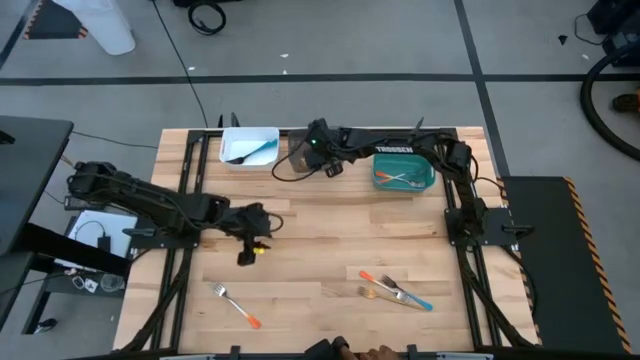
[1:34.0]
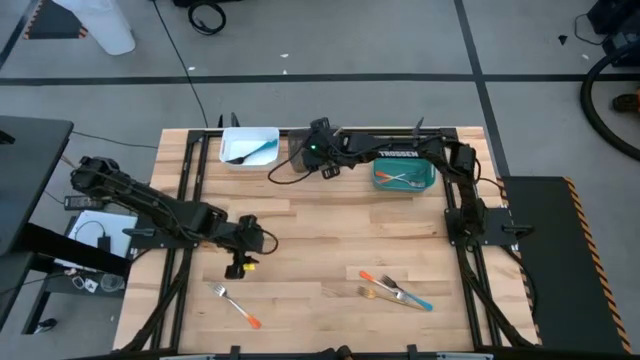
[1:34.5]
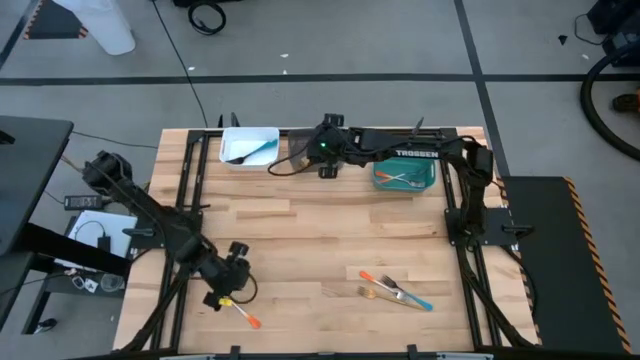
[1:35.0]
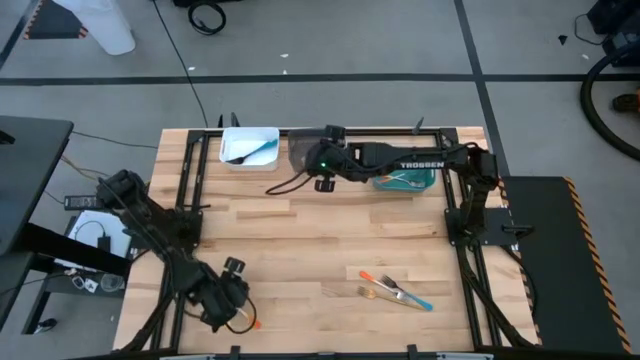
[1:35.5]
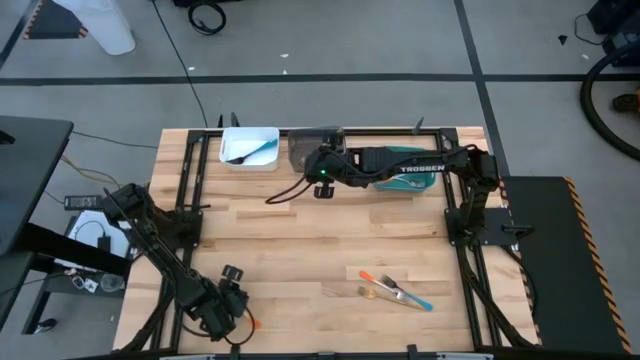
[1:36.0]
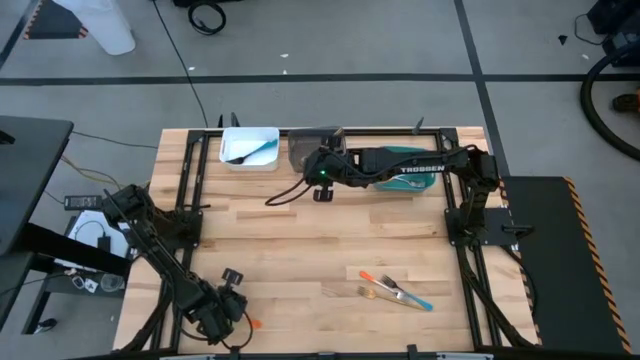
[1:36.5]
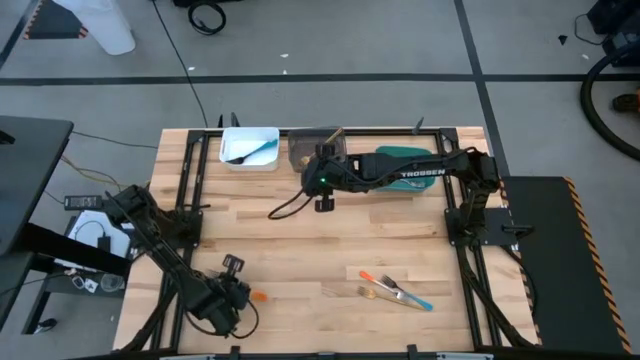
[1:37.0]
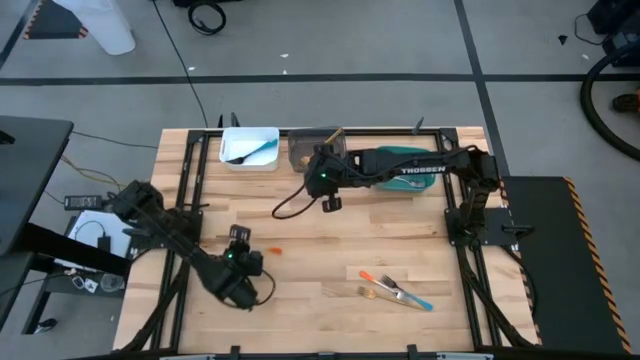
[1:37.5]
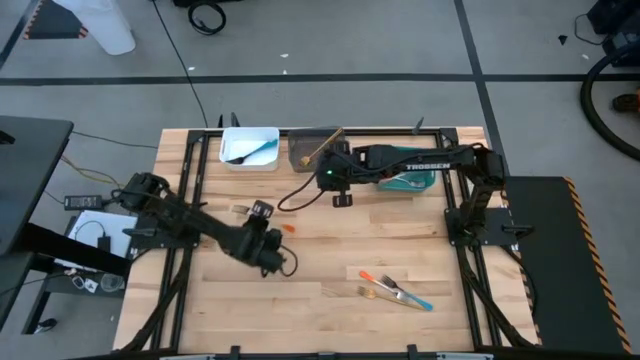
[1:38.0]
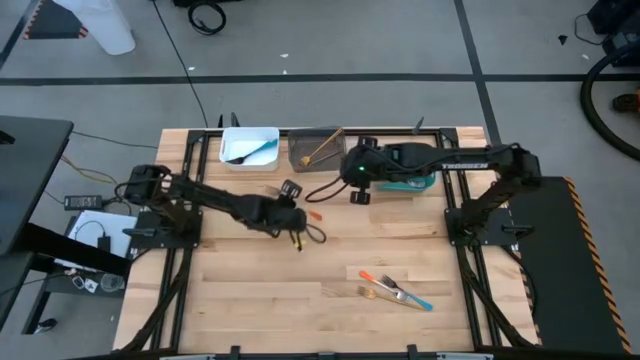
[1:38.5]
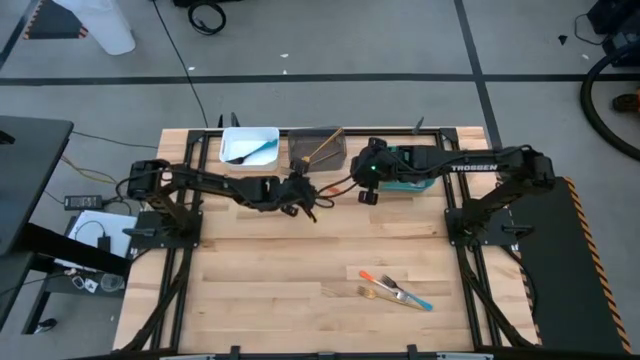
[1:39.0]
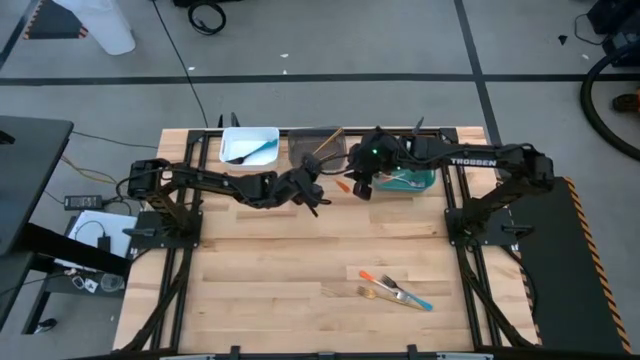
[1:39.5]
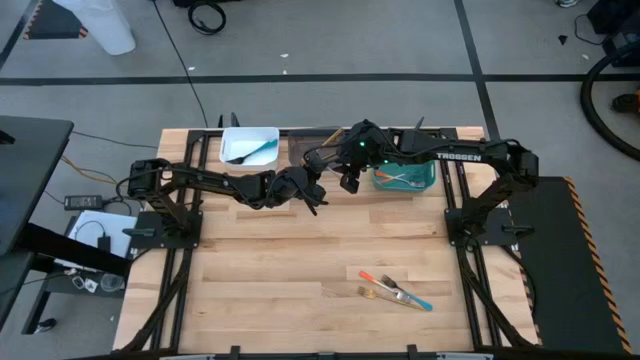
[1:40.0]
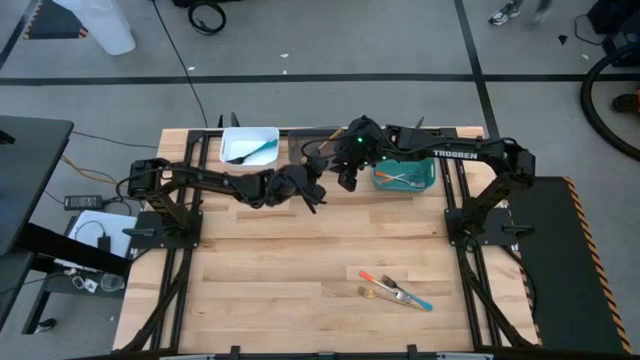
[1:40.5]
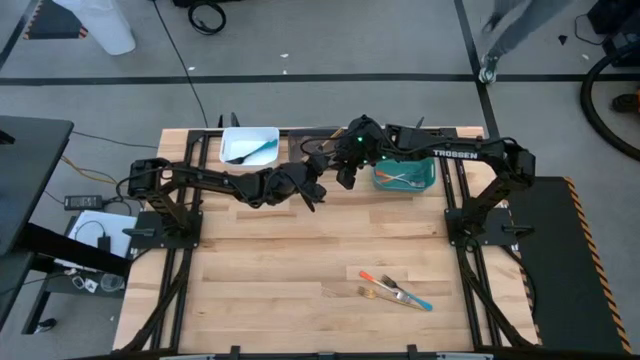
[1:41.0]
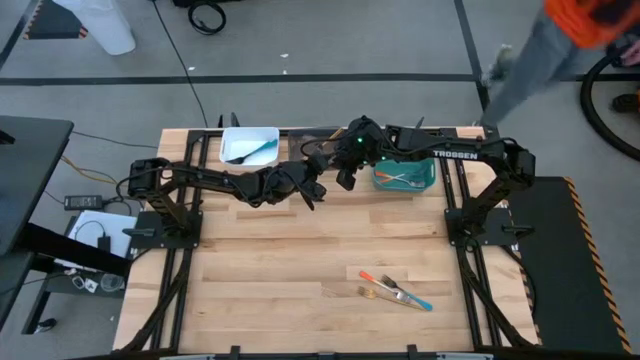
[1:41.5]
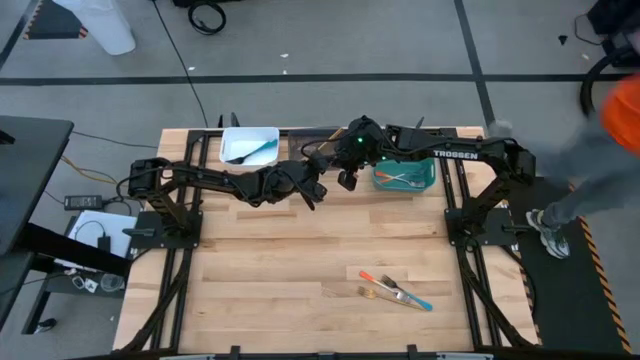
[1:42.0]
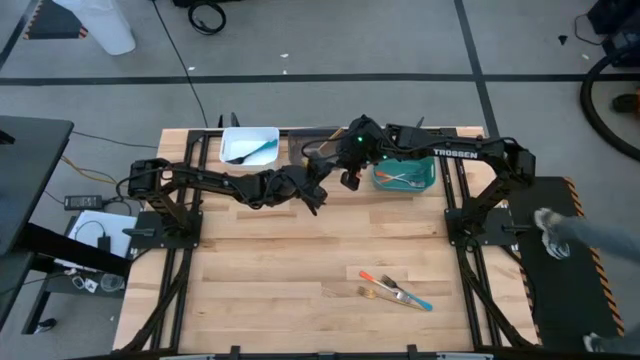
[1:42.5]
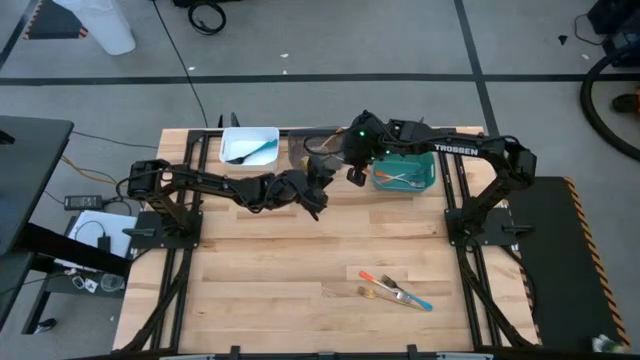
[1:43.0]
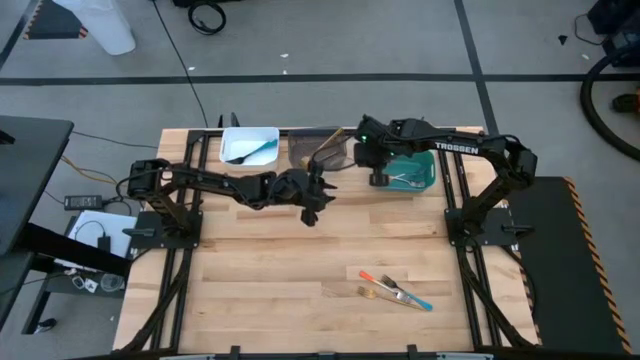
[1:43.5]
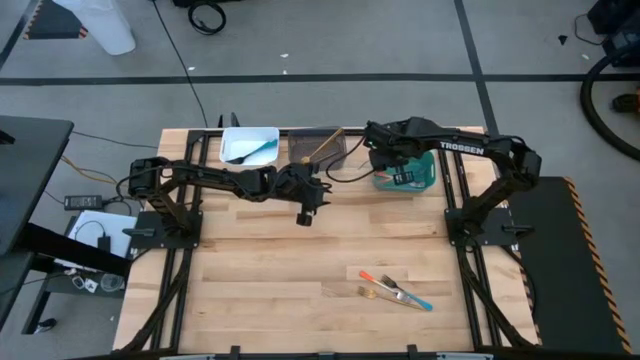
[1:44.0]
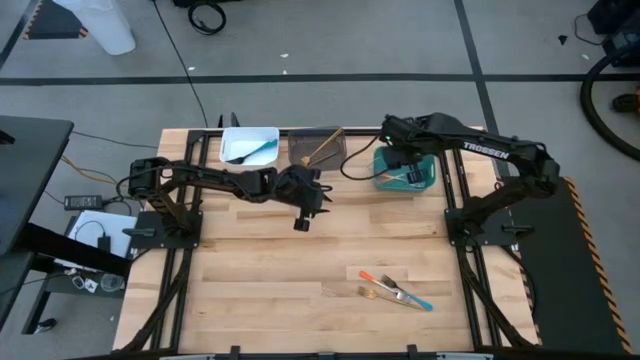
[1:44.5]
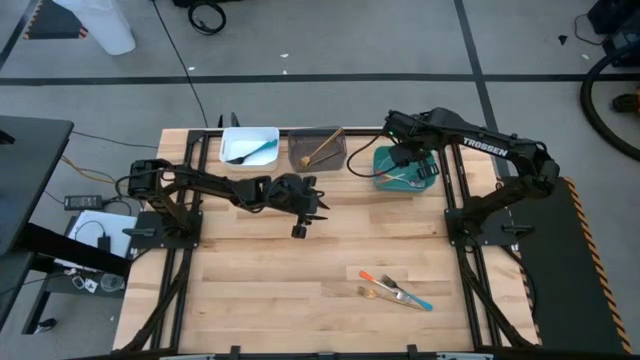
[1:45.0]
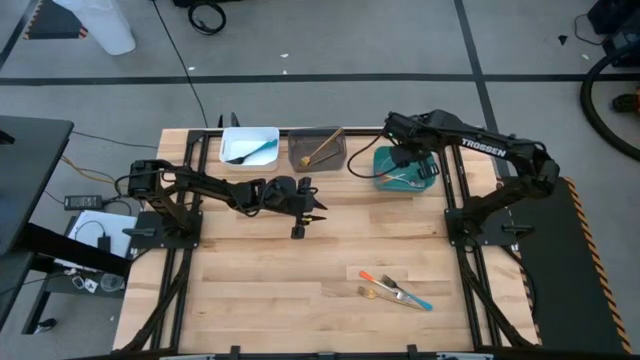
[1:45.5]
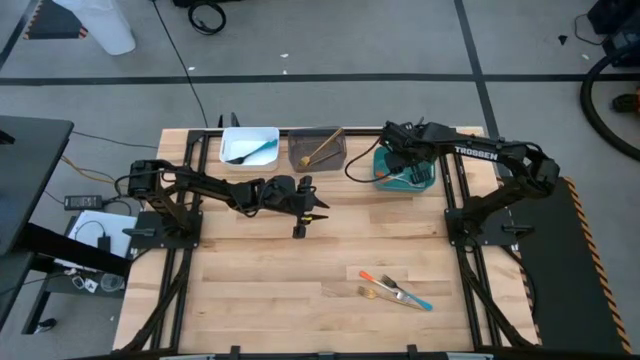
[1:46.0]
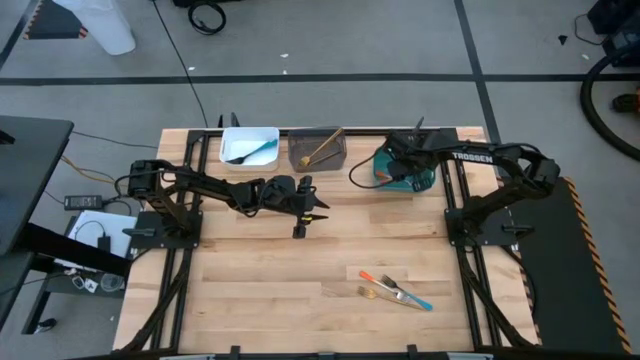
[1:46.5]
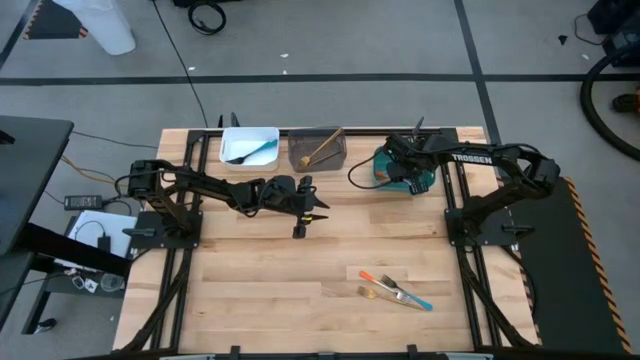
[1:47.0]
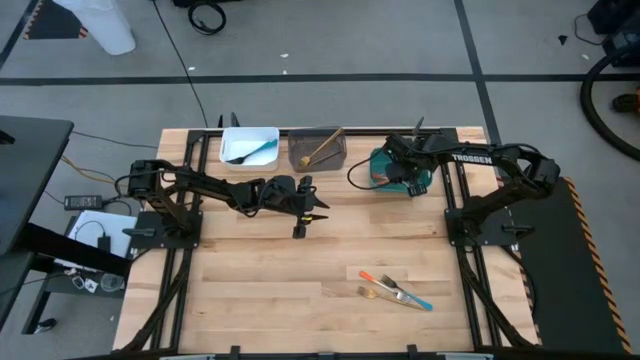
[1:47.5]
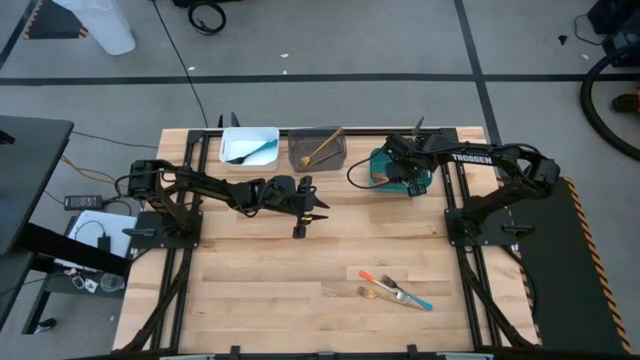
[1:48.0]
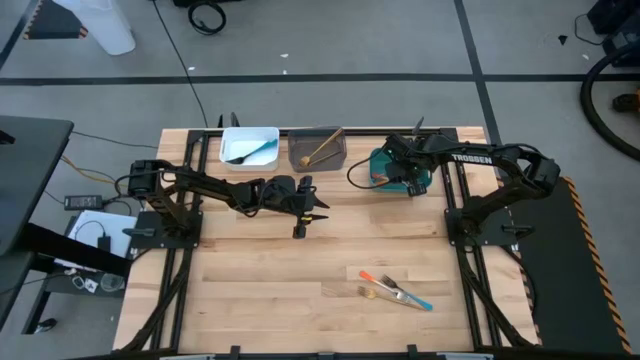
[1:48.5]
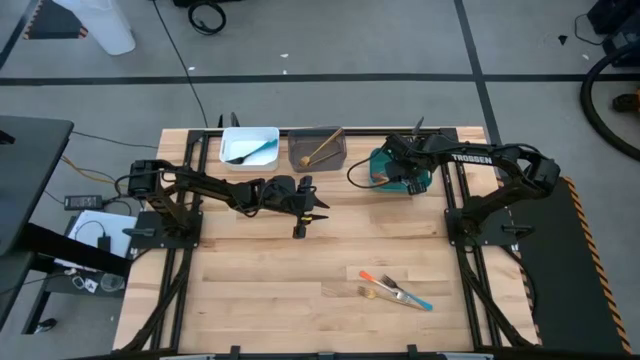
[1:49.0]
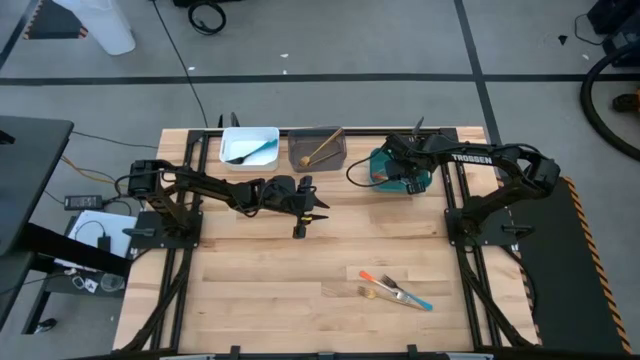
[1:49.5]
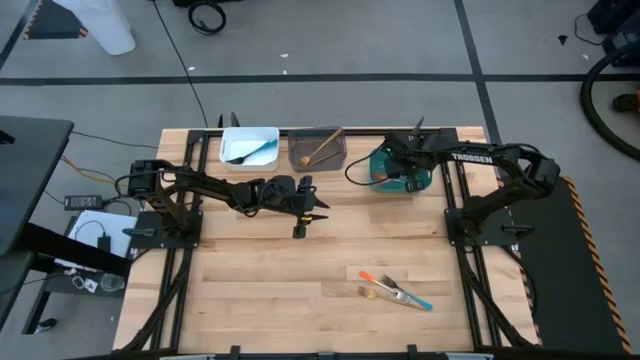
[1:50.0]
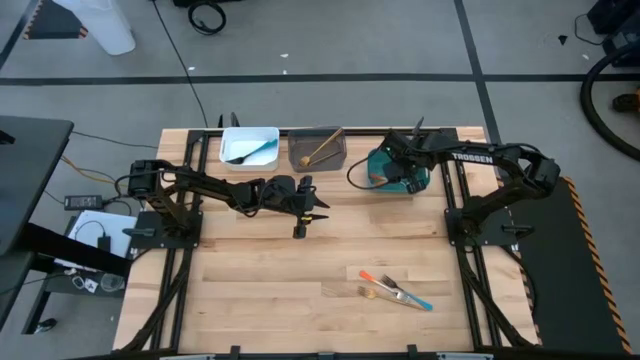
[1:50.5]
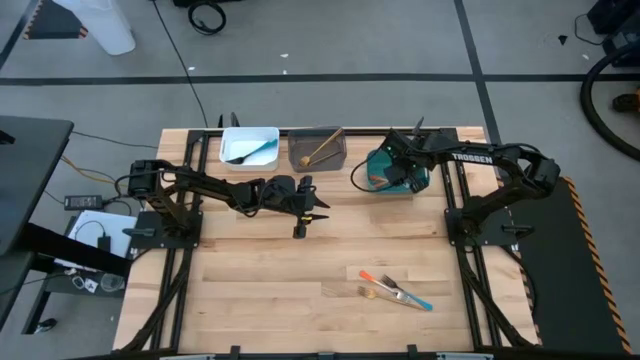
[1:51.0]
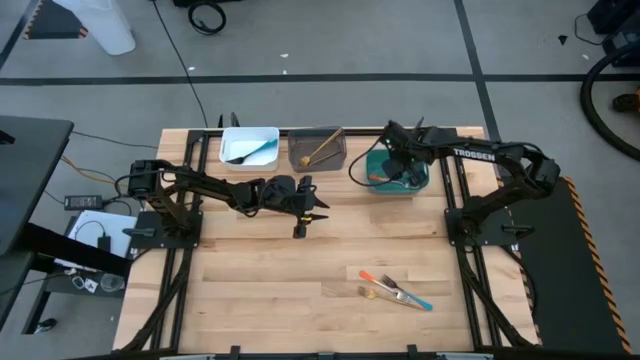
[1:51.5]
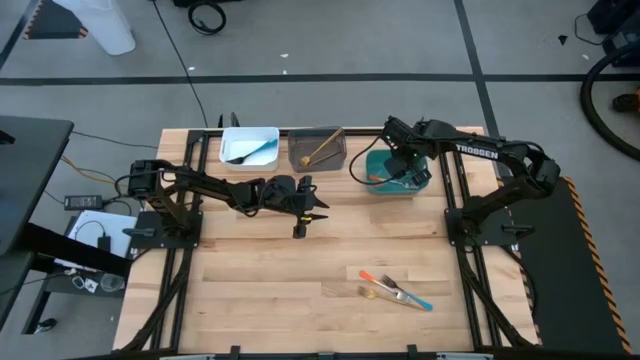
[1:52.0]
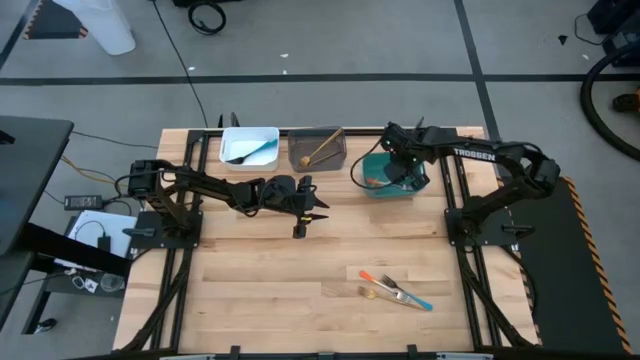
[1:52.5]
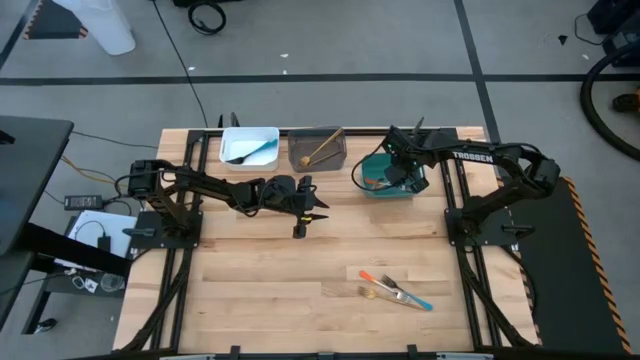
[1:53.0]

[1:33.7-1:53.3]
Task: Sort silverware by color (type)
Put the orange fork into the green bin
